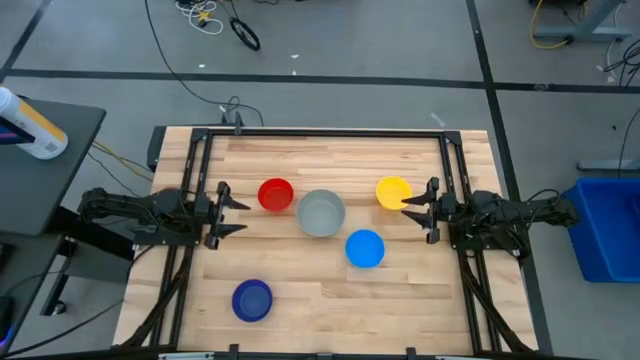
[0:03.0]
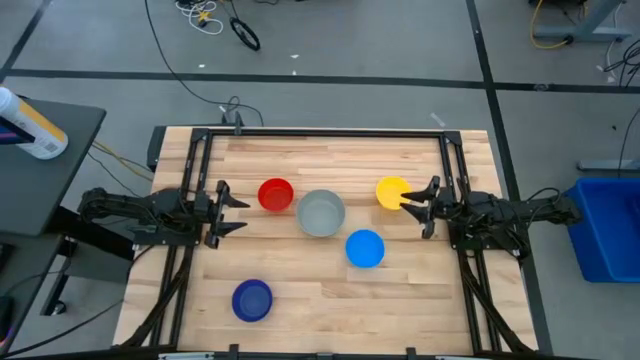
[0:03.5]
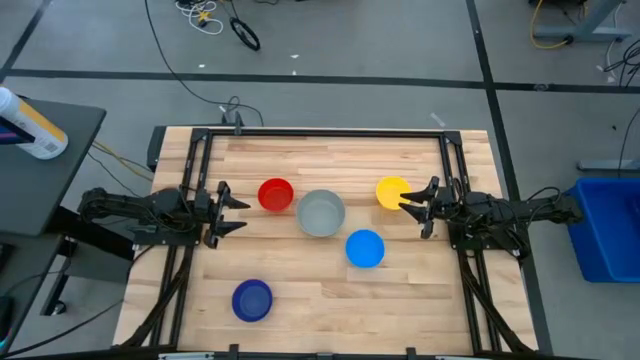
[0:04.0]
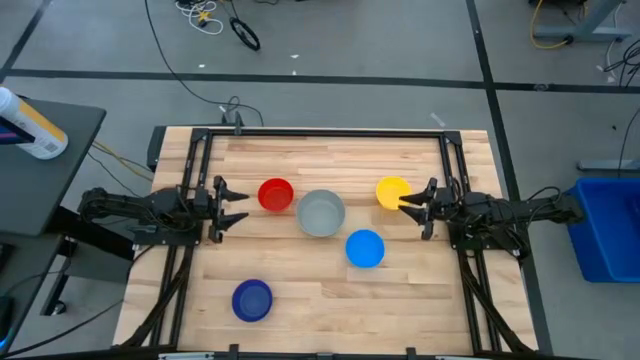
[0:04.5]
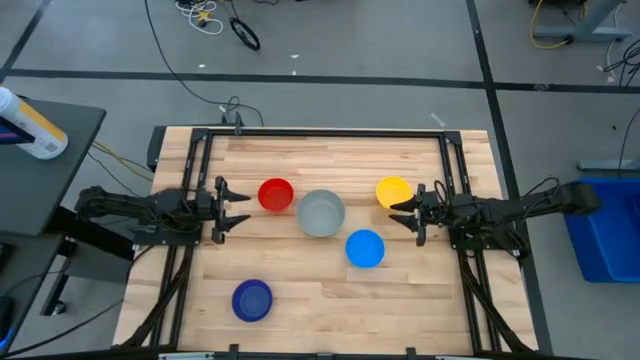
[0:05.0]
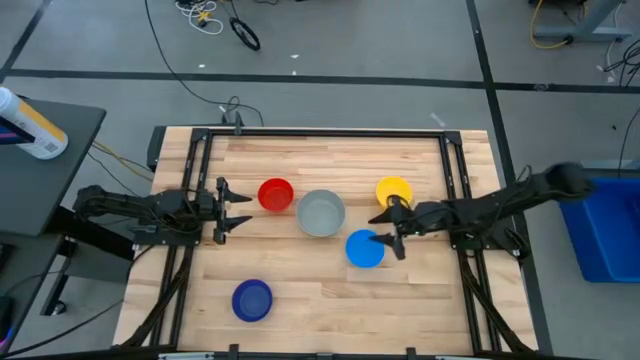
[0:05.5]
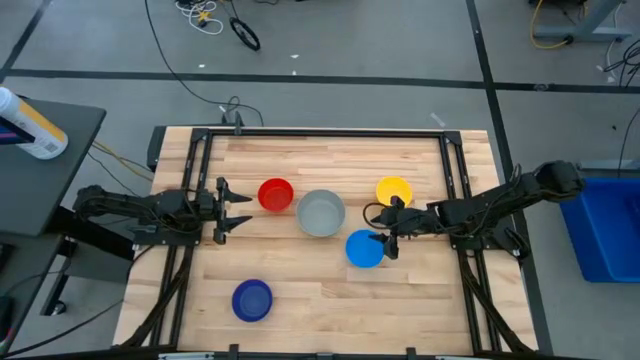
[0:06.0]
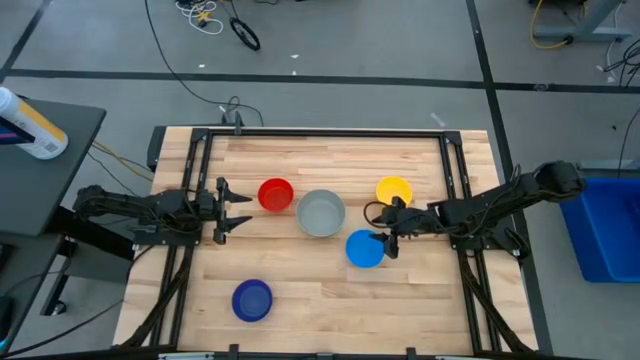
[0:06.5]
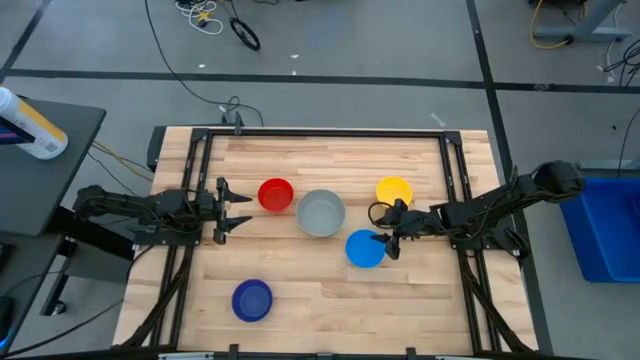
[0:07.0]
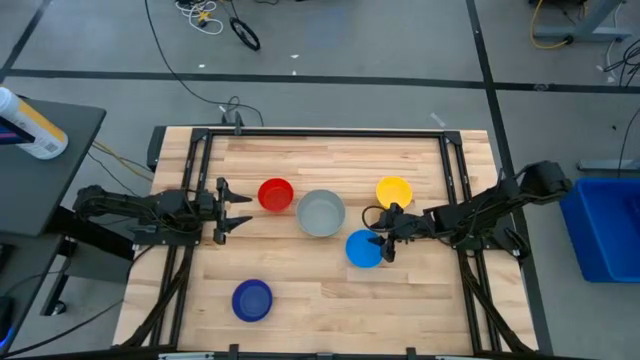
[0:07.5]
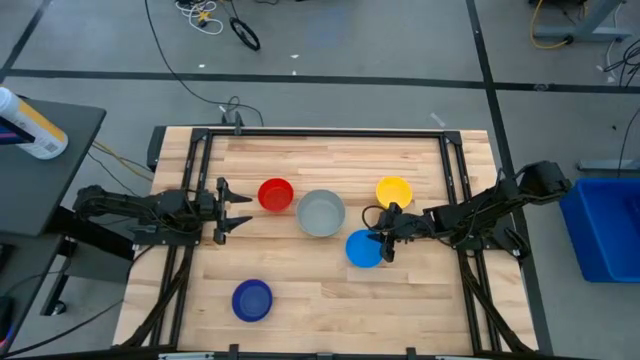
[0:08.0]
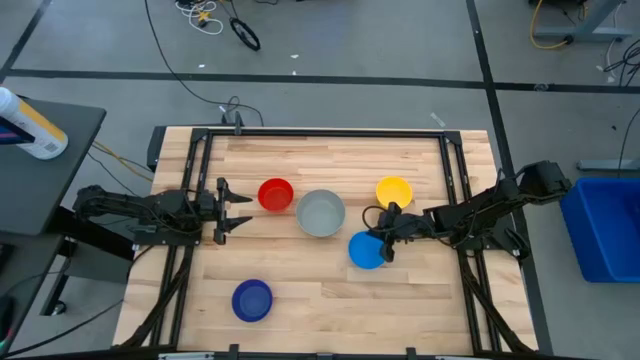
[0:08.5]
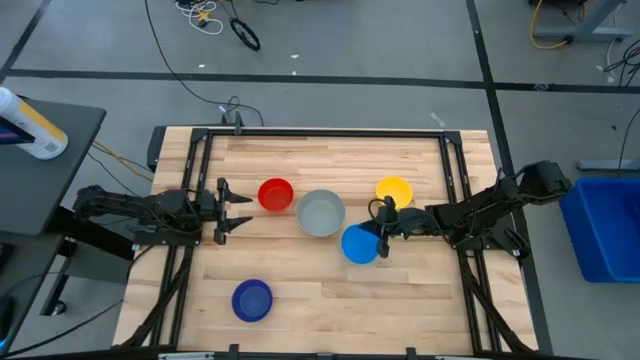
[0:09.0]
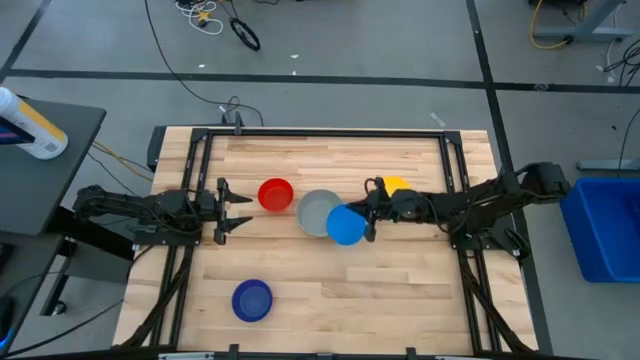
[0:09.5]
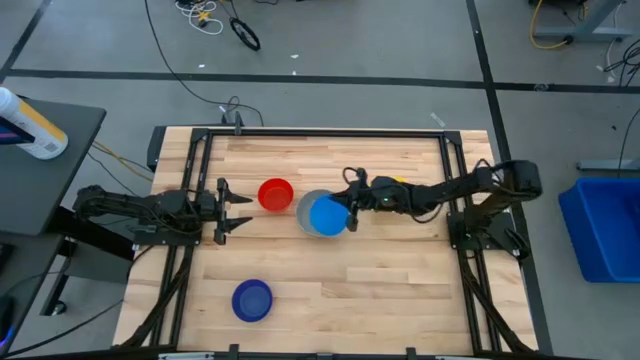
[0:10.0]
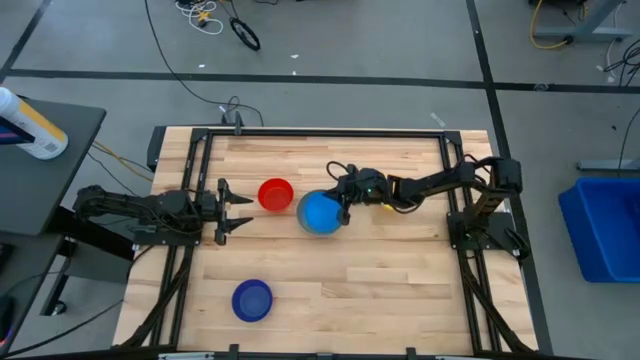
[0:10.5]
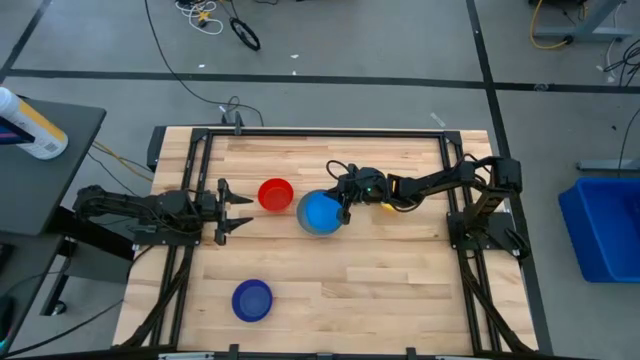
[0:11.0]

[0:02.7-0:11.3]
Stack the light blue bowl on the gray bowl

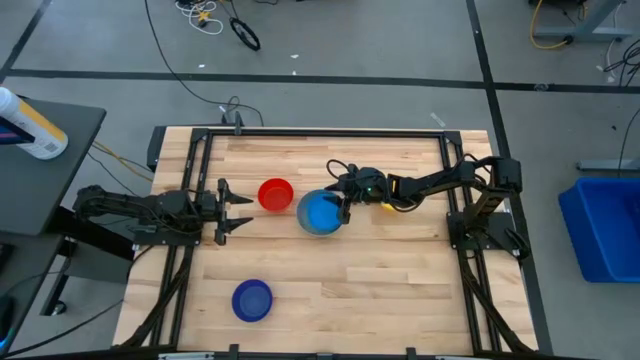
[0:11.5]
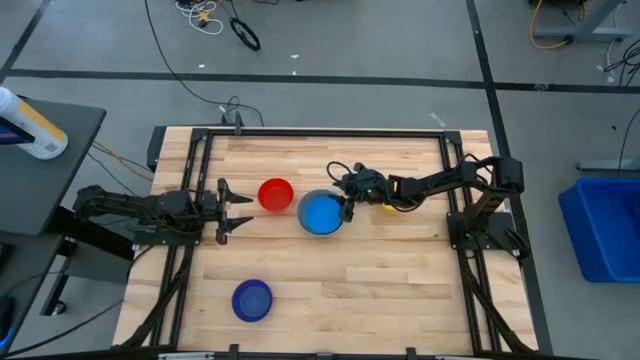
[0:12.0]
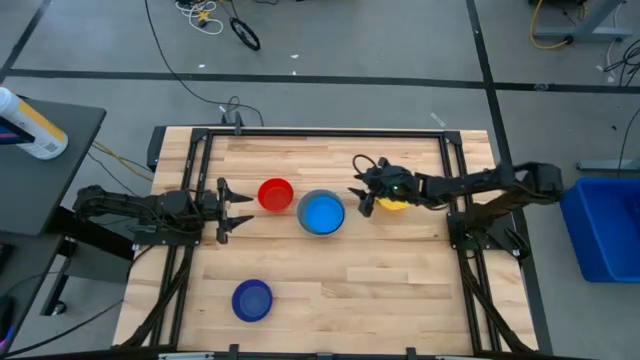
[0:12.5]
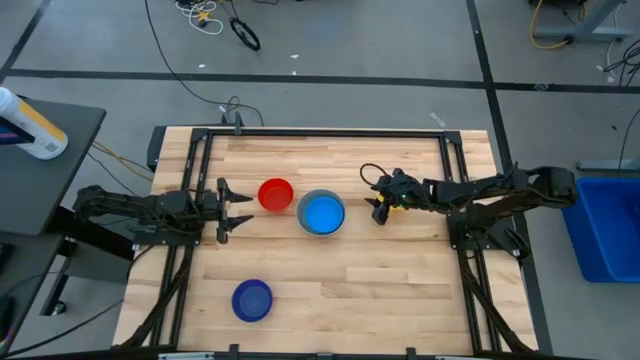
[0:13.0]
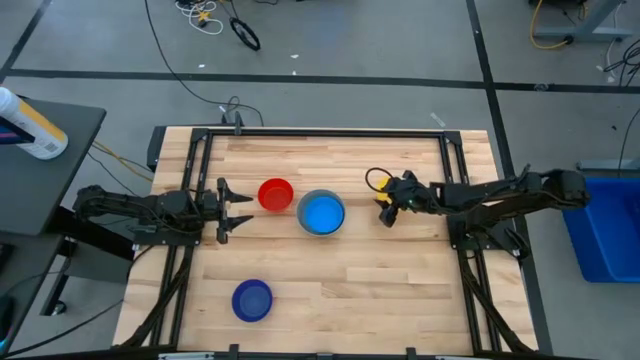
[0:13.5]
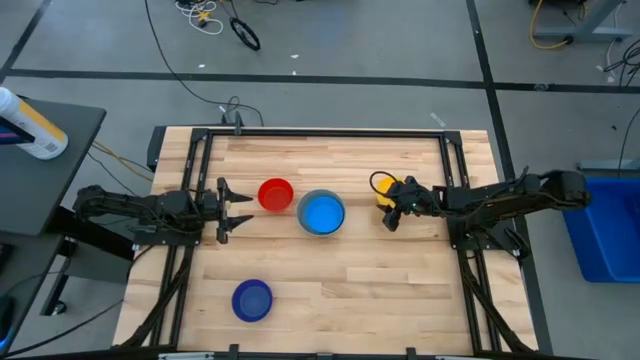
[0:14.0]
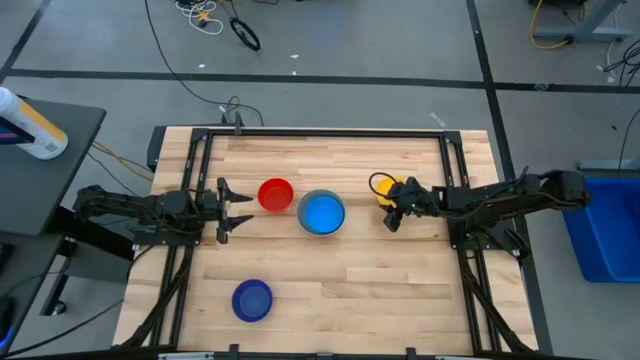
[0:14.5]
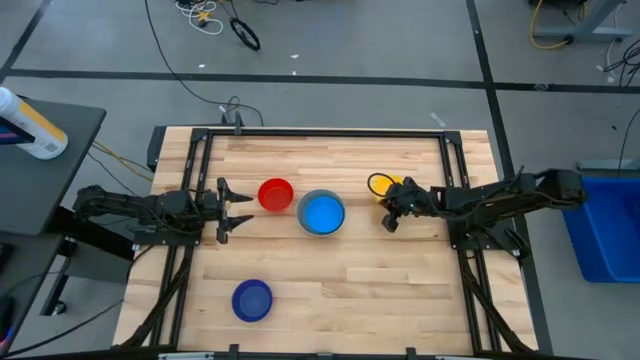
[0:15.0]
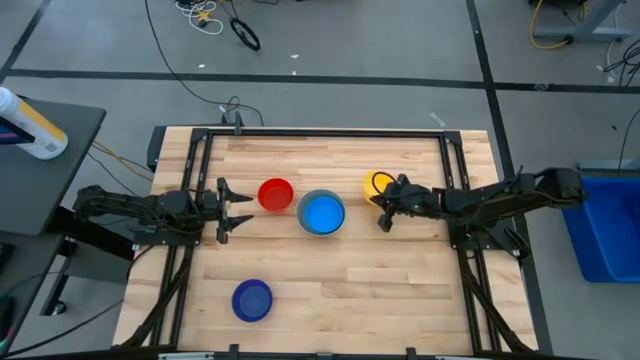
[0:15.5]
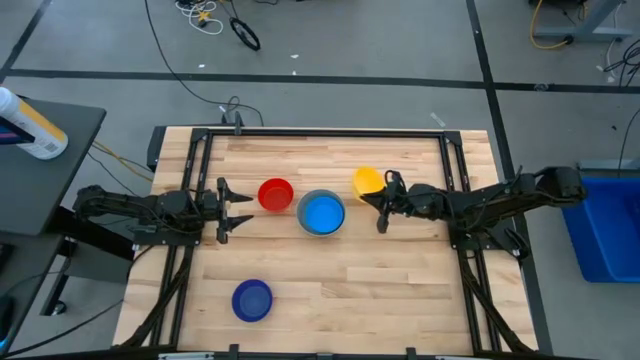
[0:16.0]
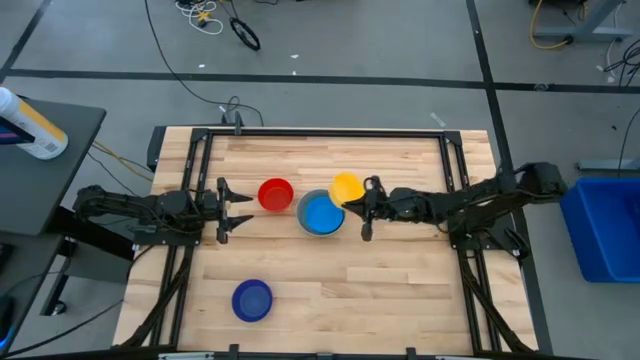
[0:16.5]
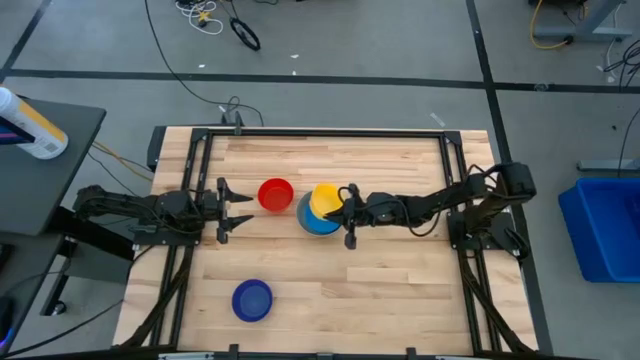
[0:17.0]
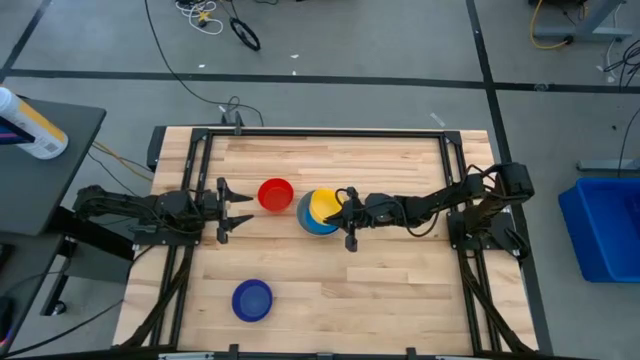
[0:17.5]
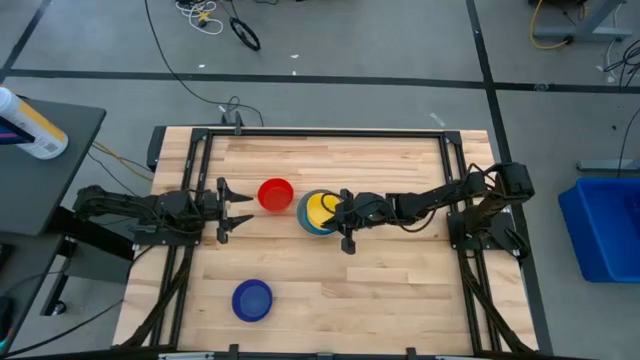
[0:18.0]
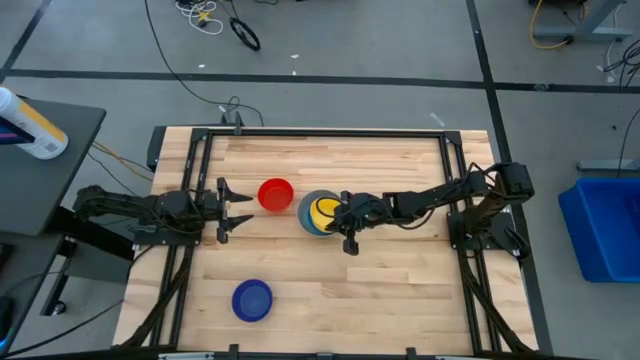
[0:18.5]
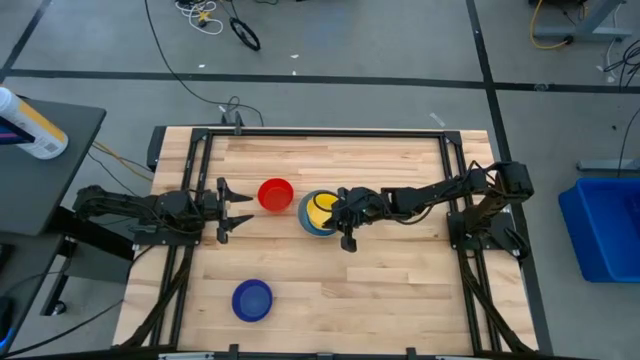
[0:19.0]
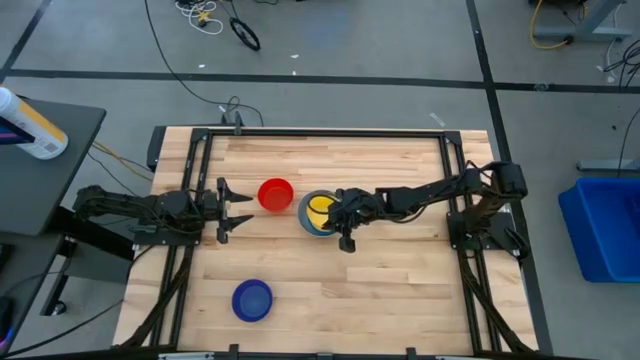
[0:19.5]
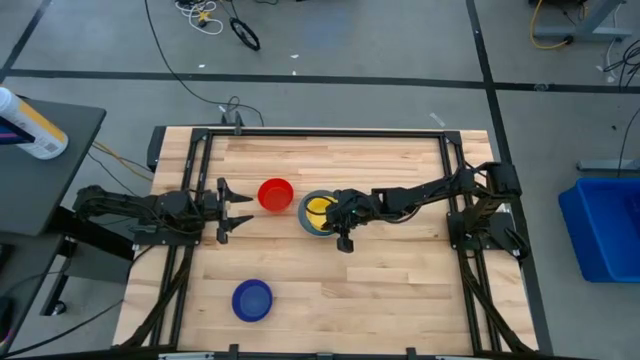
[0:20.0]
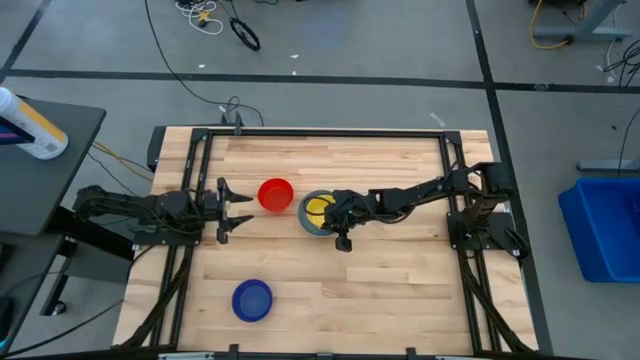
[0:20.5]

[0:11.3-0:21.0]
Stack the yellow bowl on the light blue bowl
